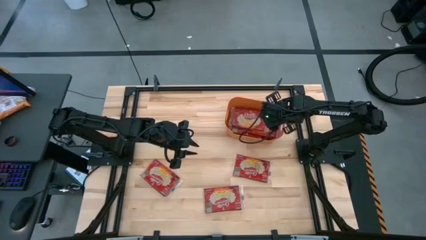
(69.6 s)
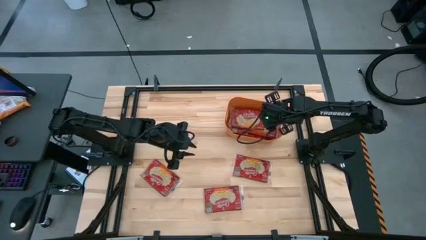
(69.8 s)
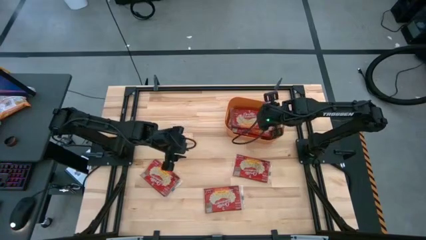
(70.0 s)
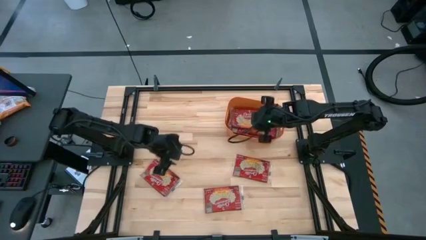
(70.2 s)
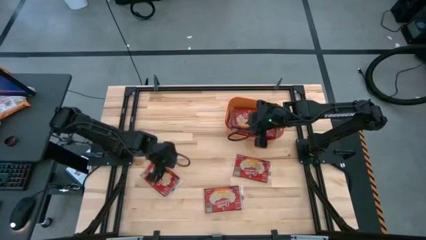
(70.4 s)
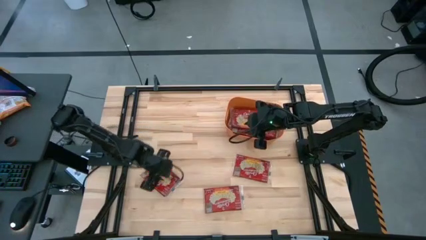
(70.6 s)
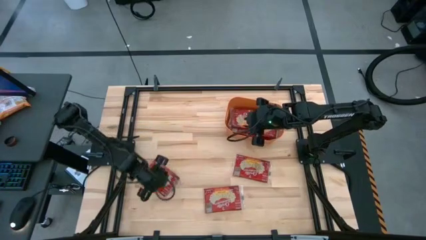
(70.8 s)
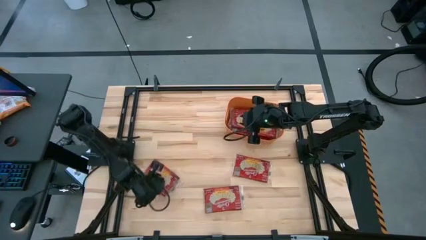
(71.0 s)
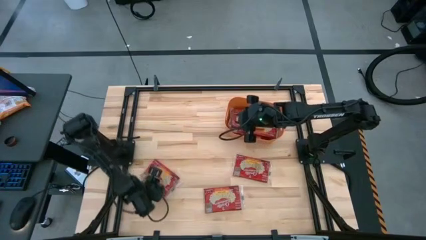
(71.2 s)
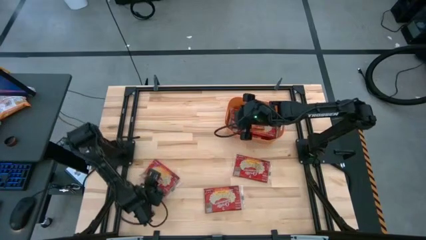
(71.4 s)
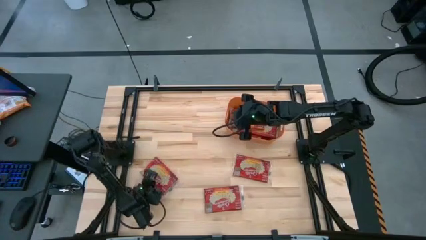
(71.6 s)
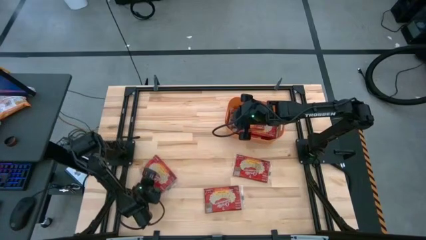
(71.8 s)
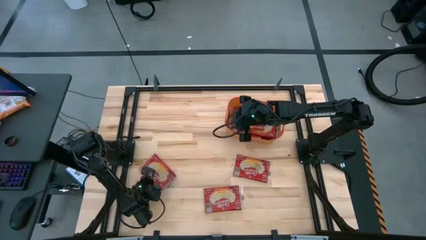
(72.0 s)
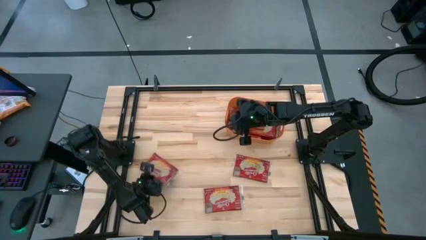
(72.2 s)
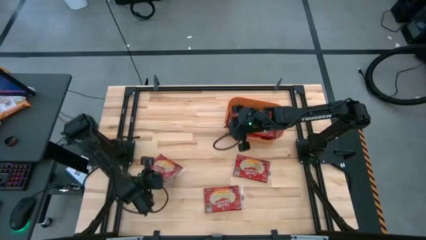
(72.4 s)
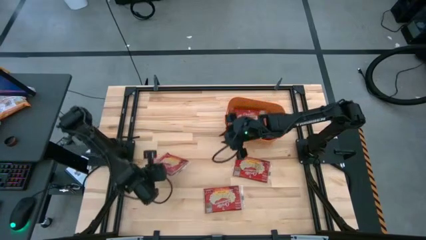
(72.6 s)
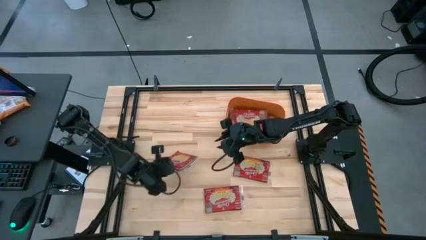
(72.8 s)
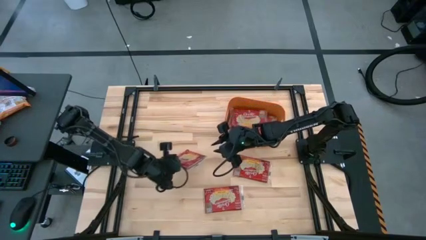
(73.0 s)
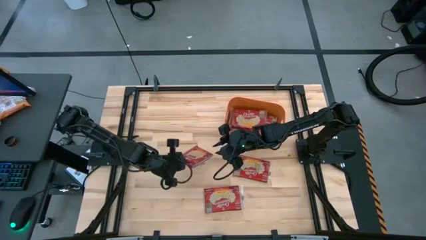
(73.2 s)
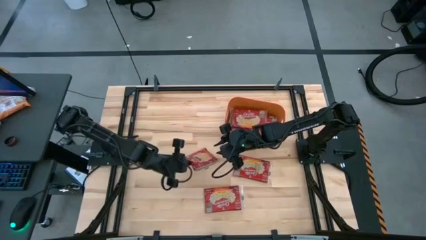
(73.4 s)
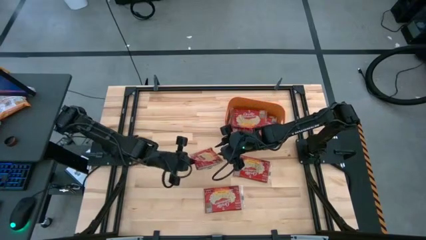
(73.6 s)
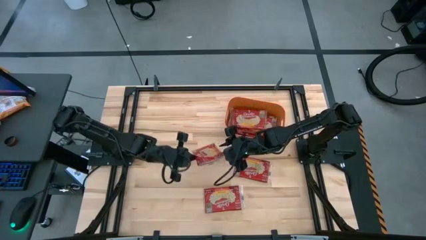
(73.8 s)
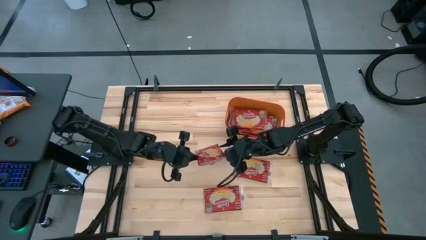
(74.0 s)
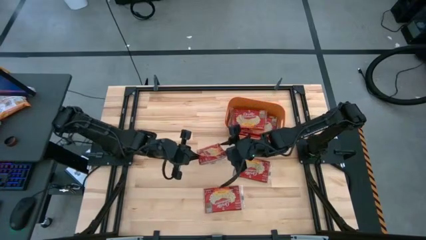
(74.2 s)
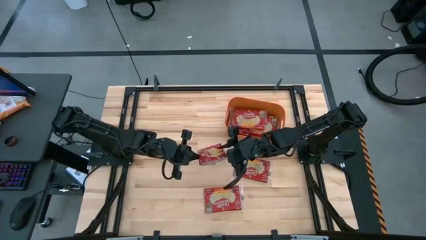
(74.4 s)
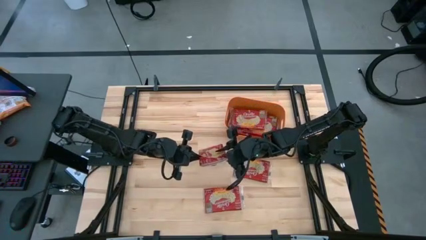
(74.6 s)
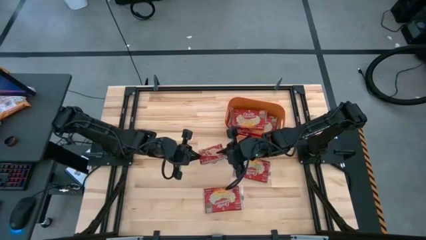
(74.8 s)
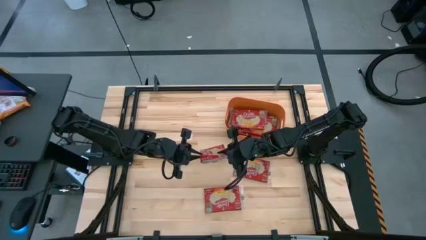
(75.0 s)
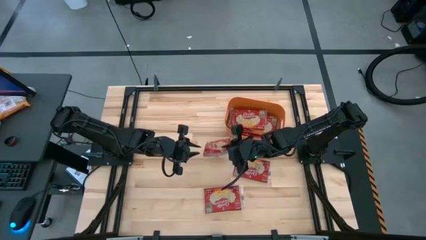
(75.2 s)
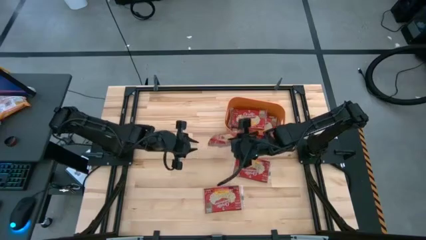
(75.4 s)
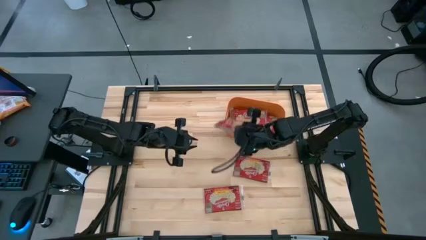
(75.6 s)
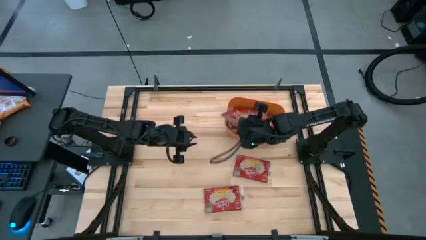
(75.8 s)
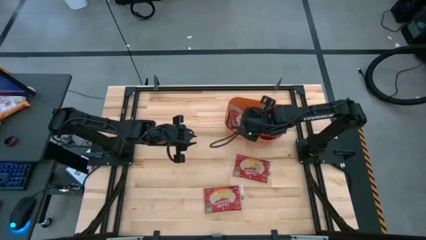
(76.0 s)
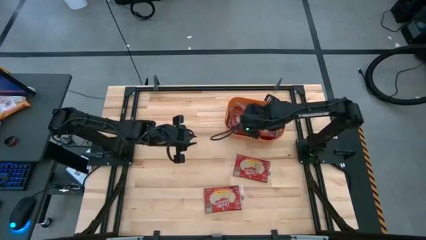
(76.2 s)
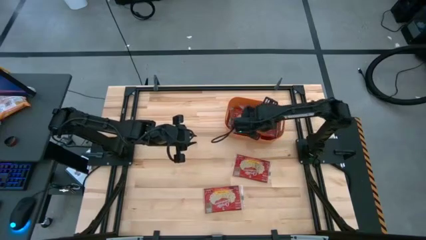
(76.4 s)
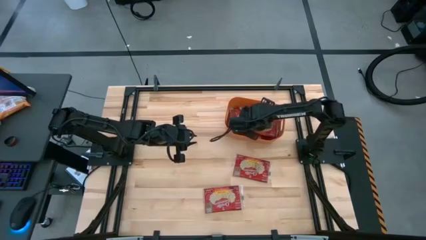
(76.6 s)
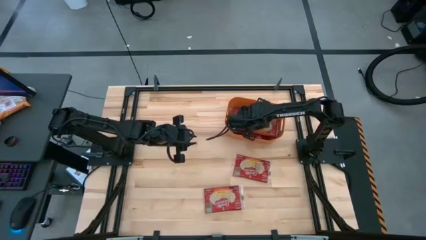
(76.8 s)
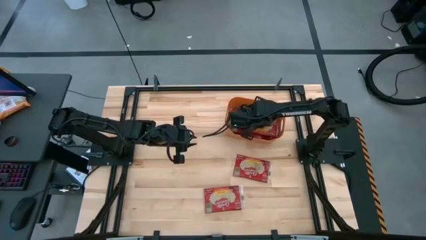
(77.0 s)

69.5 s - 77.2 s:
Task: Sort popcorn bags into baskets
Put the popcorn bag into the orange bin

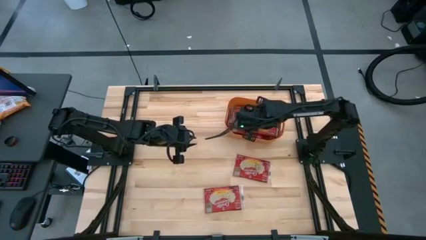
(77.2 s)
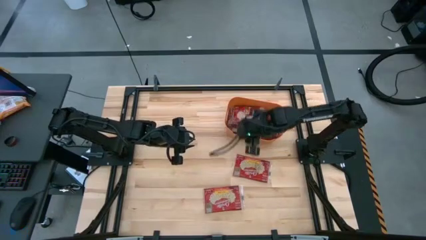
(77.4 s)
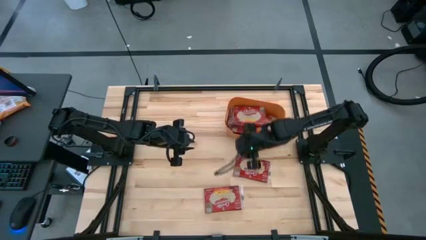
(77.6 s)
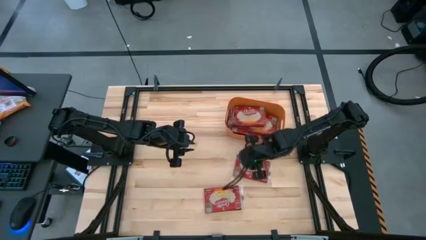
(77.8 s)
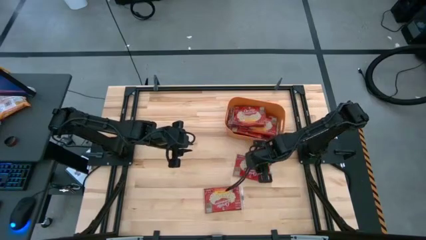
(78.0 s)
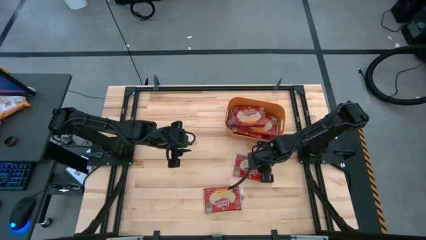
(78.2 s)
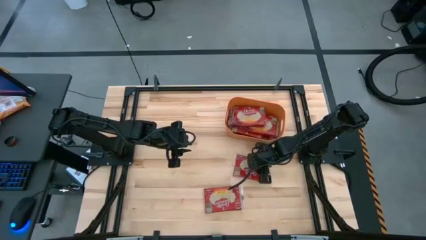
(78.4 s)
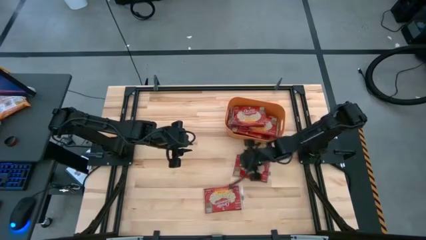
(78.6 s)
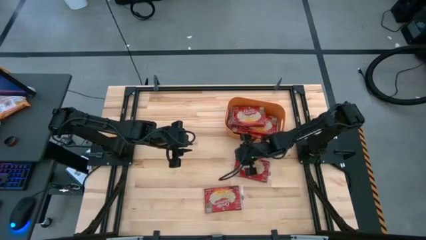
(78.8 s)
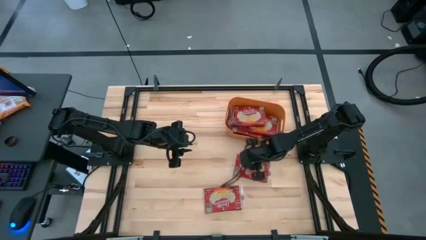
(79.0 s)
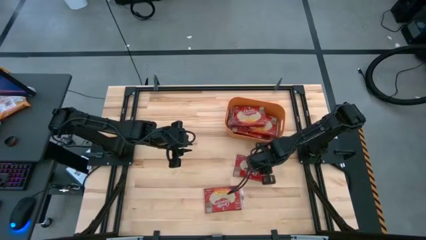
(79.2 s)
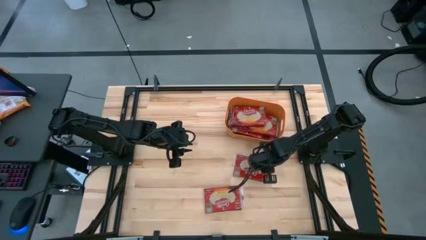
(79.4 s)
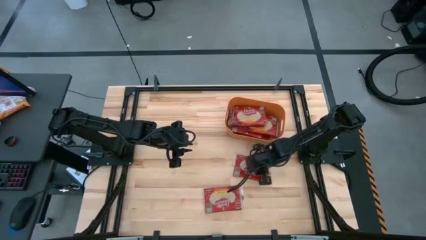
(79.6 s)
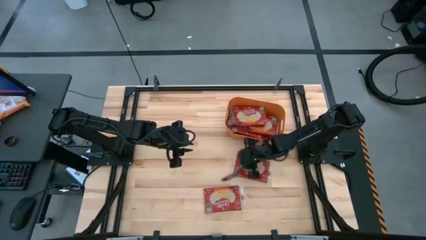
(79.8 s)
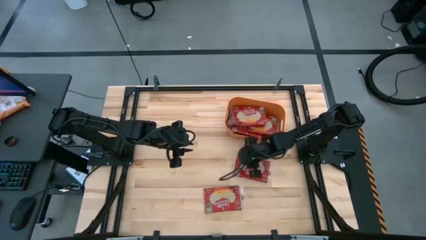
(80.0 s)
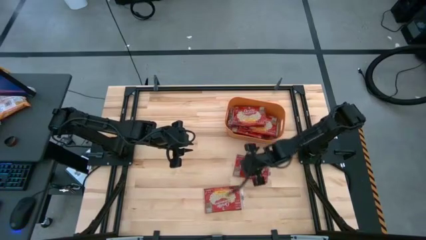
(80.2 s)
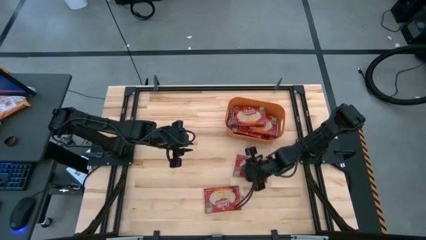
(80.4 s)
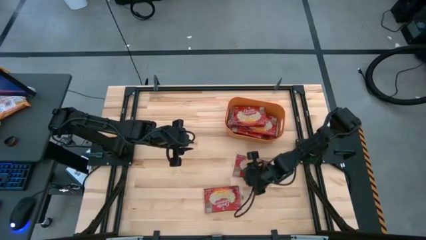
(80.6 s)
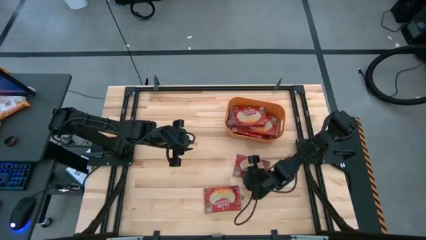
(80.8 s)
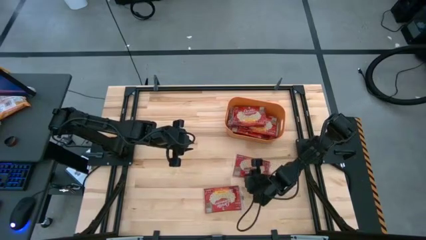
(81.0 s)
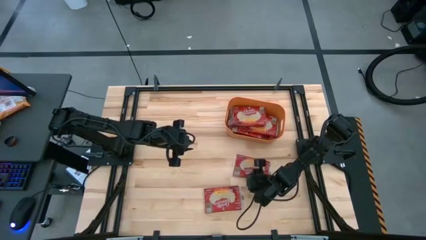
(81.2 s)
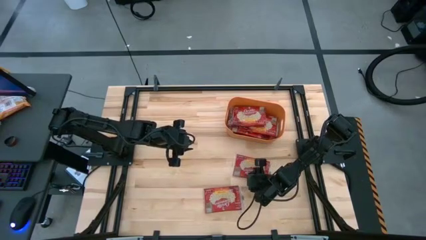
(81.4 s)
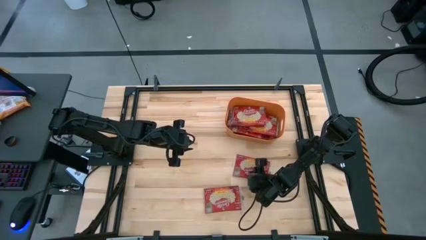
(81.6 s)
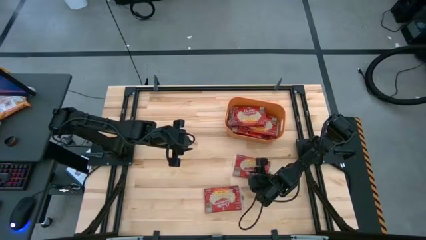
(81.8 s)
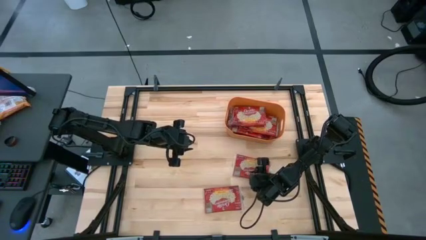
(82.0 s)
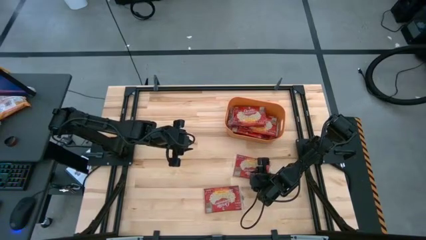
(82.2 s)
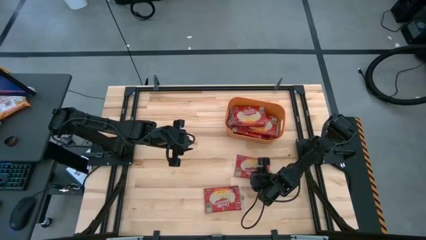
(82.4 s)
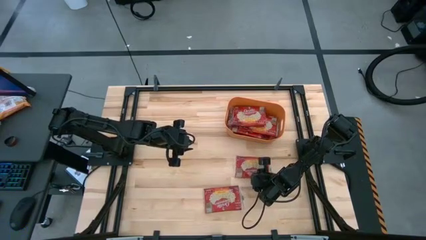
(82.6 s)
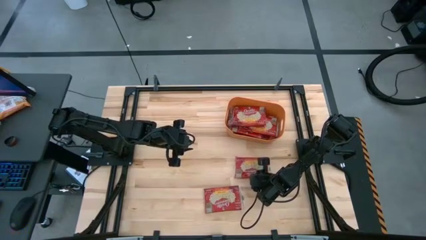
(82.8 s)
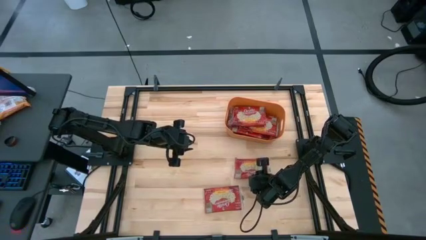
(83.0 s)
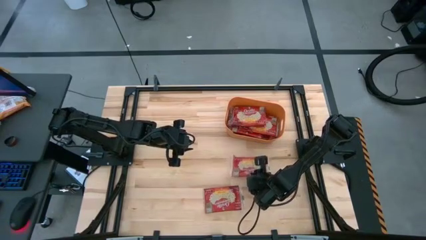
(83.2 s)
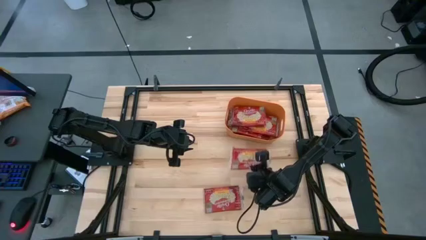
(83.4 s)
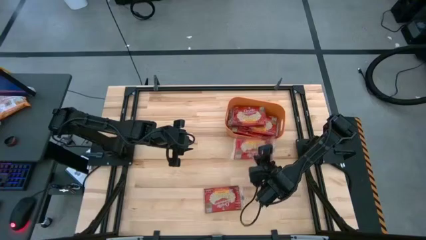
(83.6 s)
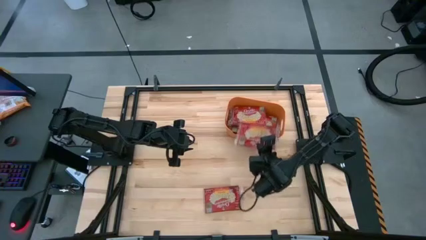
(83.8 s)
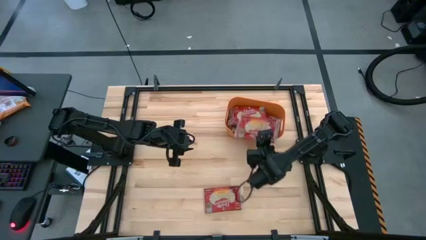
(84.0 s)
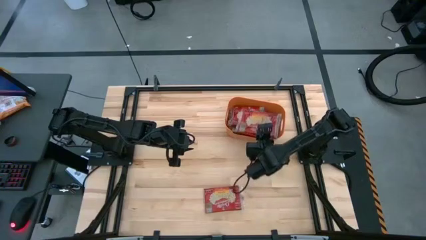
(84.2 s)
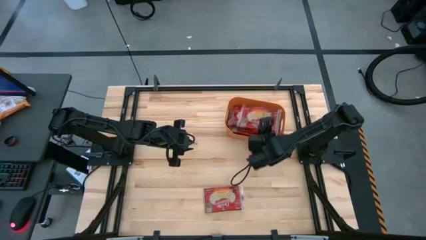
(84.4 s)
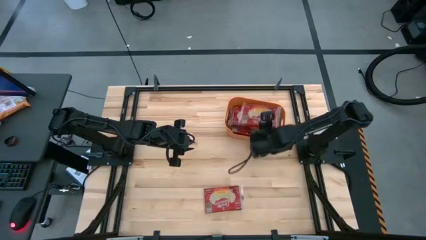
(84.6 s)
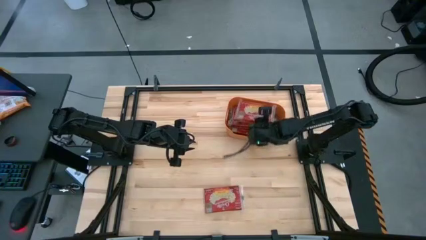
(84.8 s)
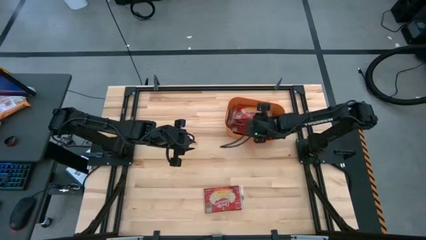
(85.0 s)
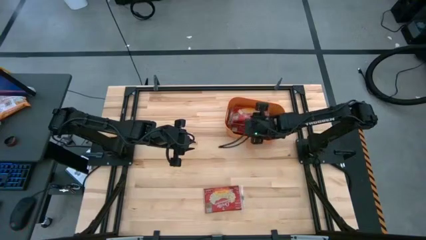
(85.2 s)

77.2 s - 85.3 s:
Put the popcorn bag into the orange bin
